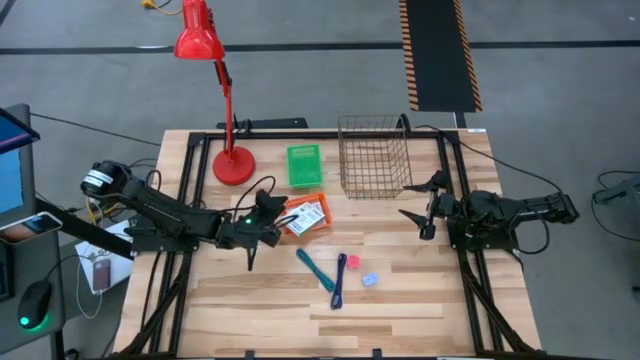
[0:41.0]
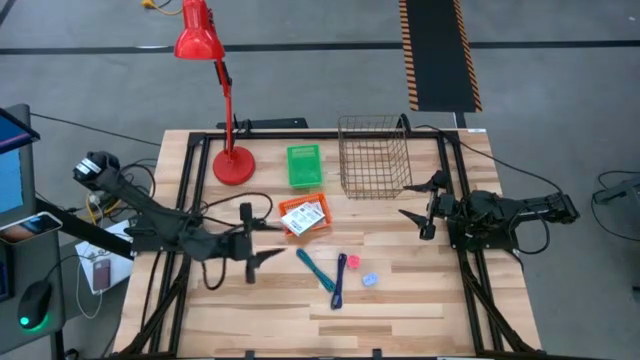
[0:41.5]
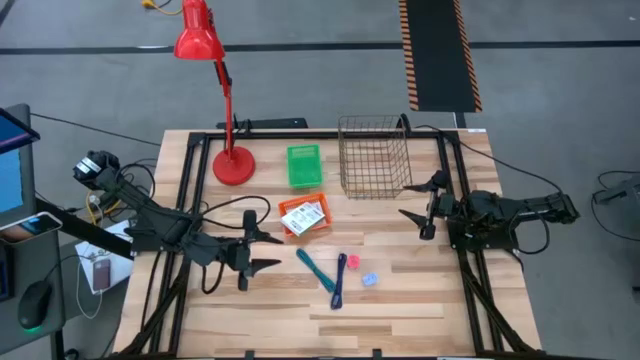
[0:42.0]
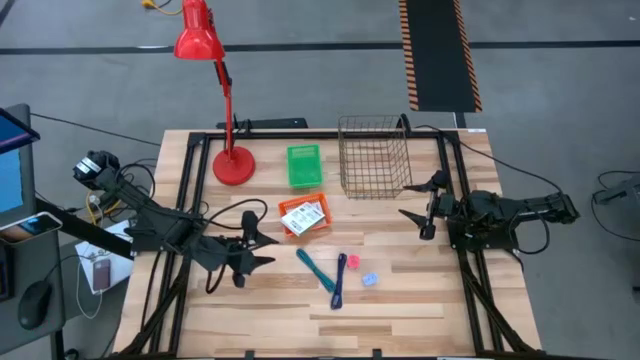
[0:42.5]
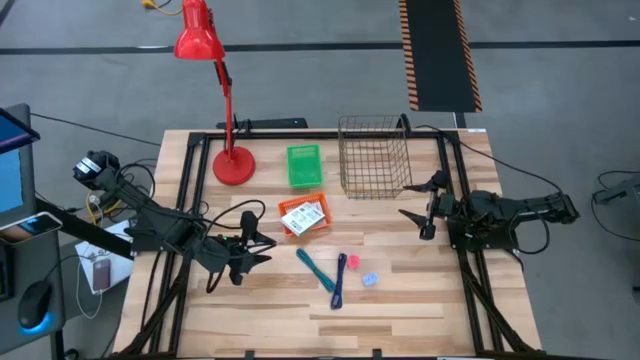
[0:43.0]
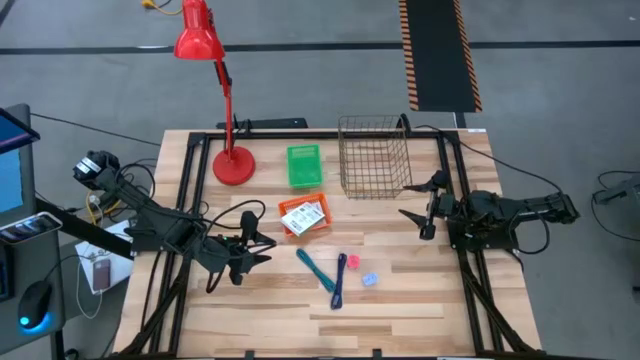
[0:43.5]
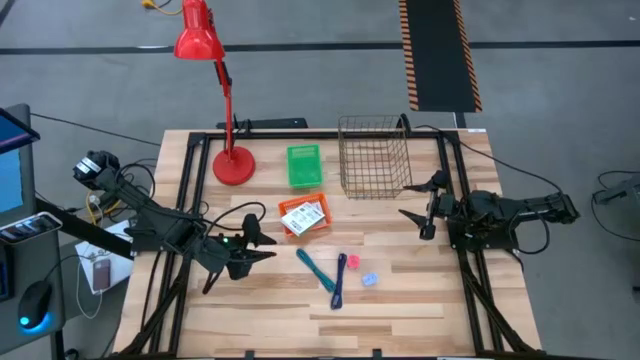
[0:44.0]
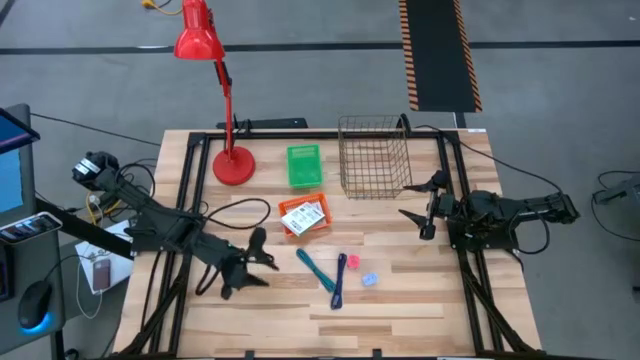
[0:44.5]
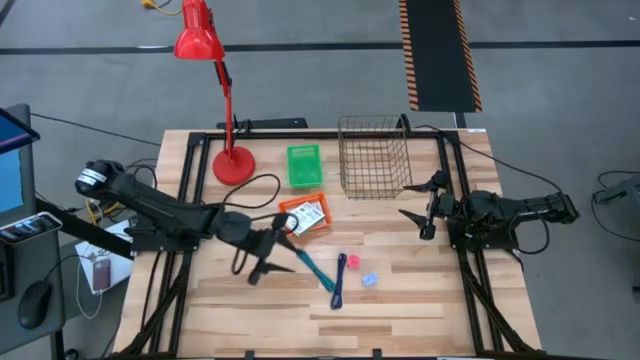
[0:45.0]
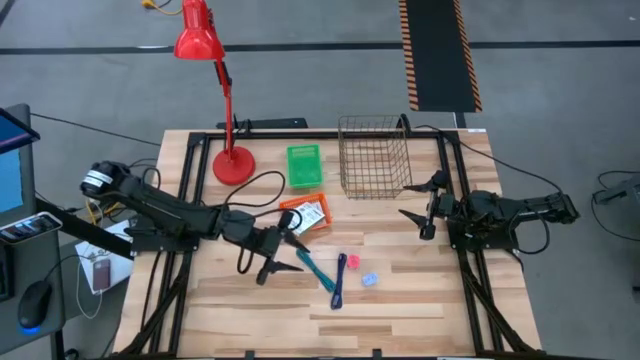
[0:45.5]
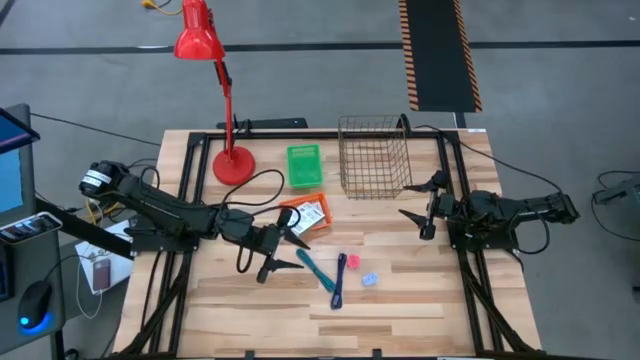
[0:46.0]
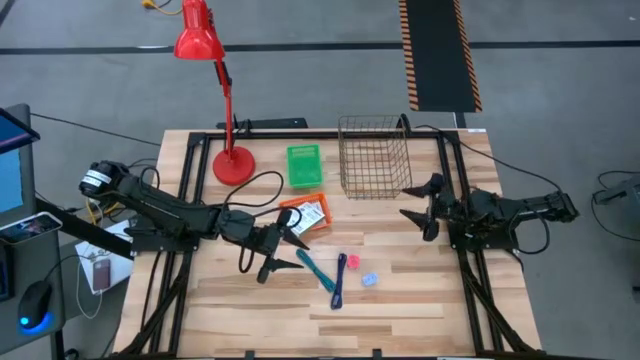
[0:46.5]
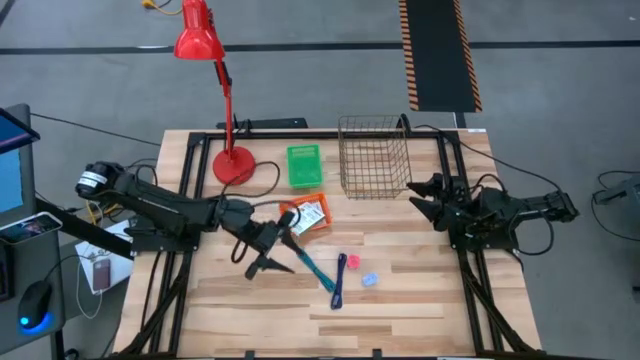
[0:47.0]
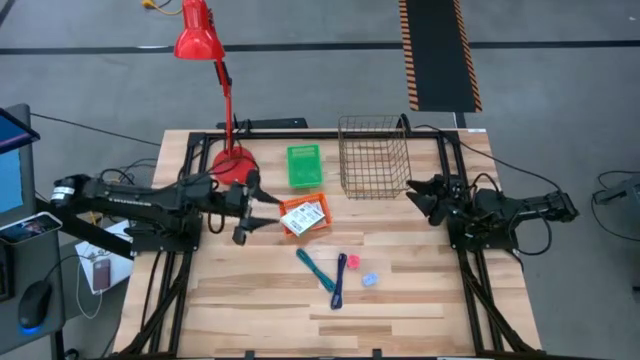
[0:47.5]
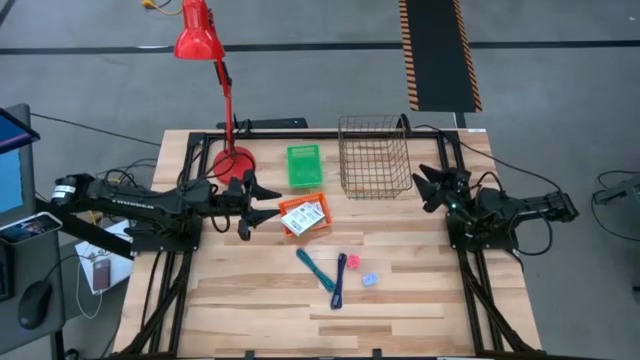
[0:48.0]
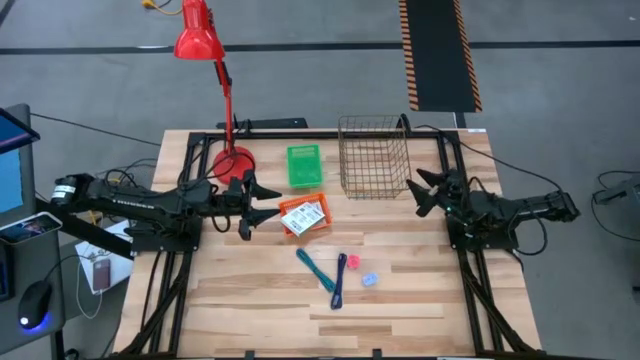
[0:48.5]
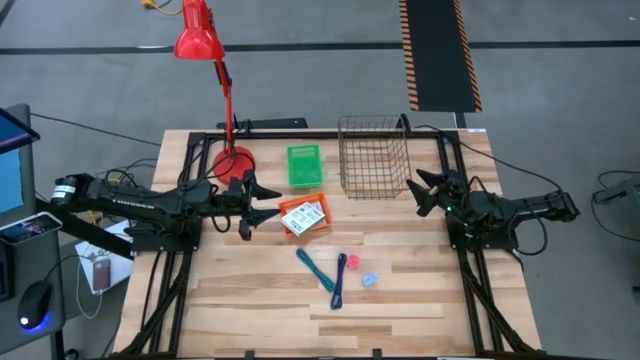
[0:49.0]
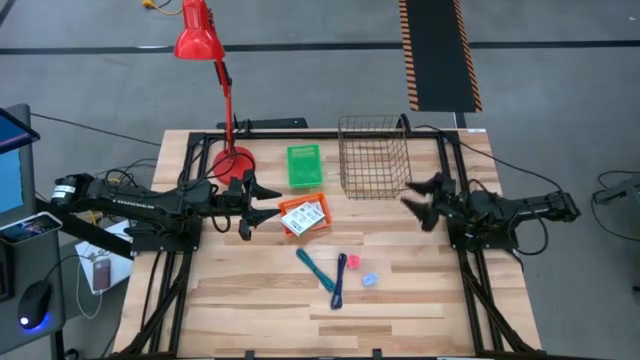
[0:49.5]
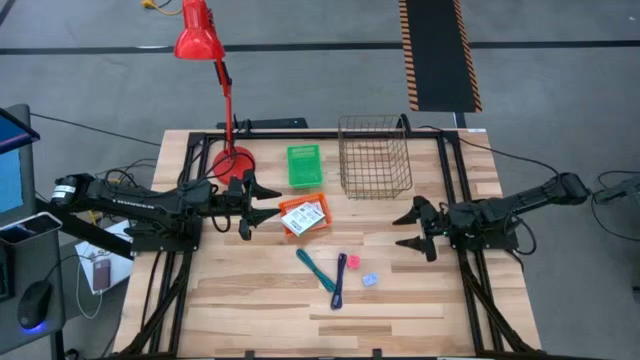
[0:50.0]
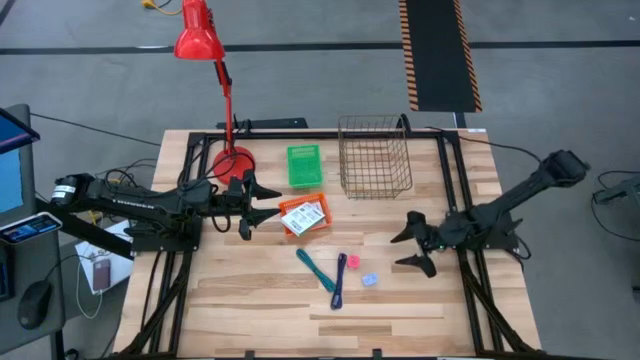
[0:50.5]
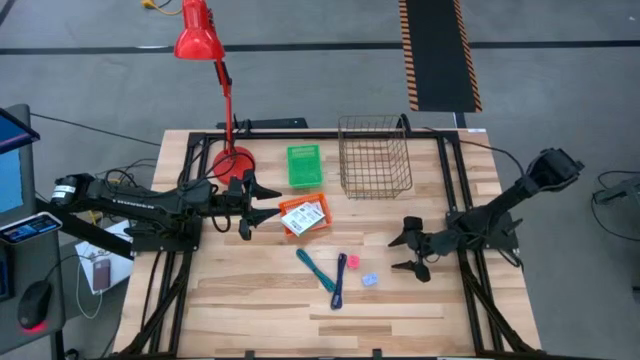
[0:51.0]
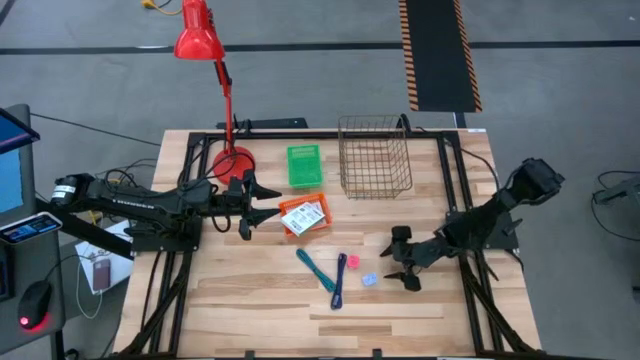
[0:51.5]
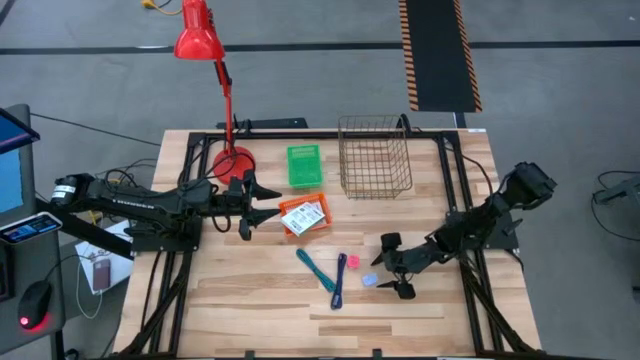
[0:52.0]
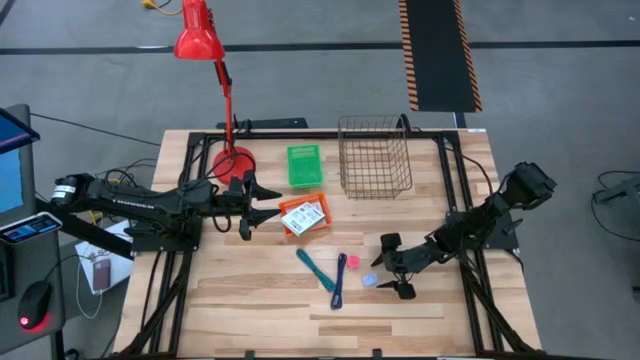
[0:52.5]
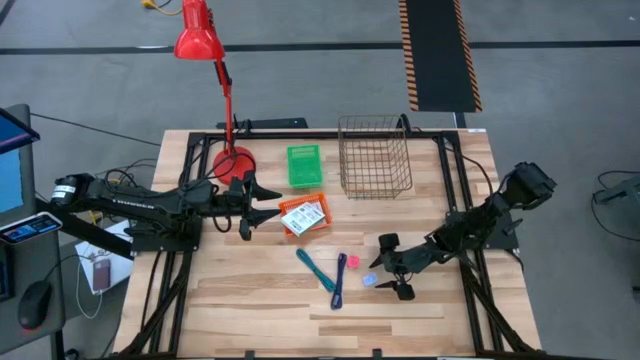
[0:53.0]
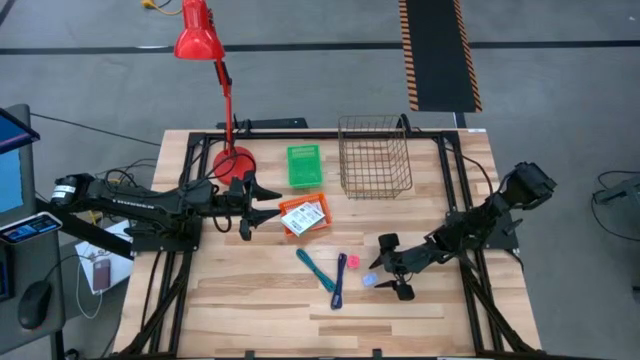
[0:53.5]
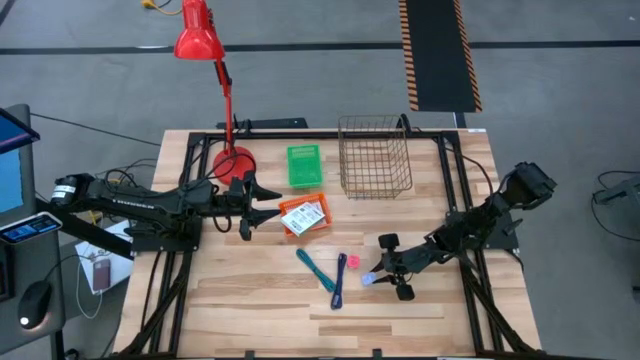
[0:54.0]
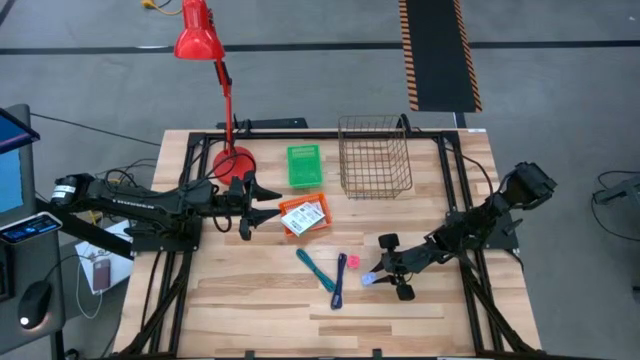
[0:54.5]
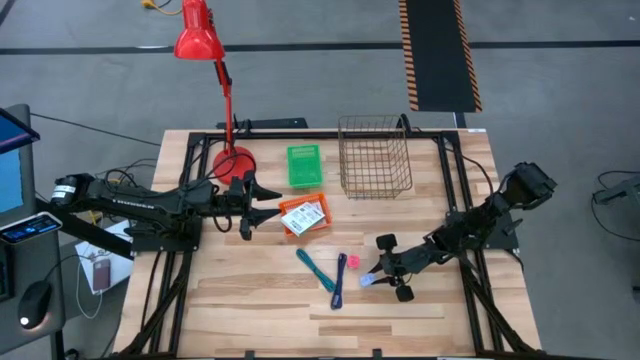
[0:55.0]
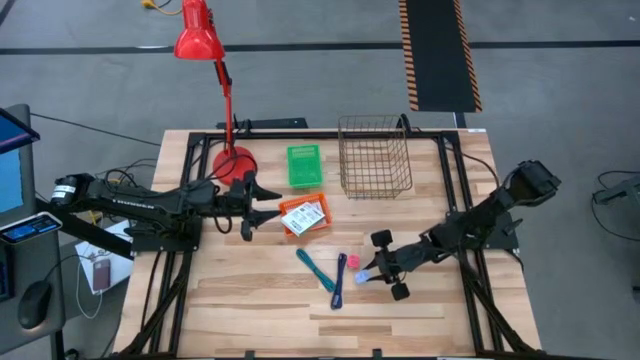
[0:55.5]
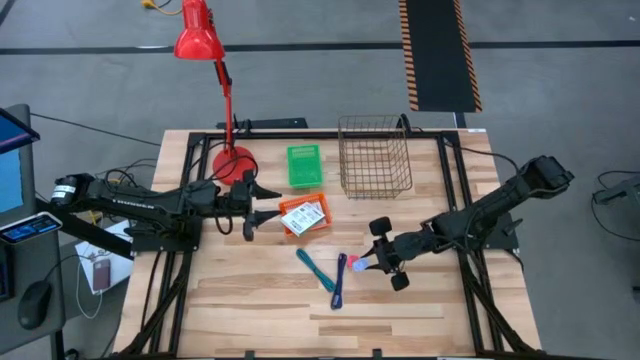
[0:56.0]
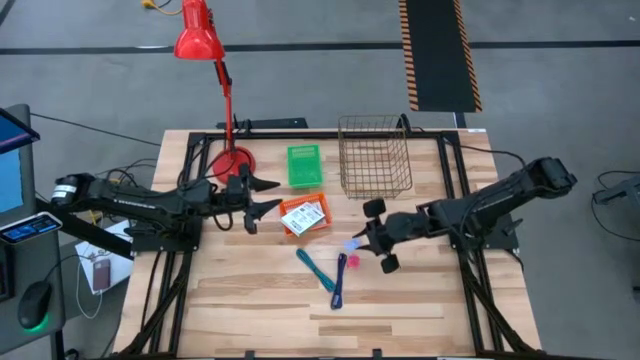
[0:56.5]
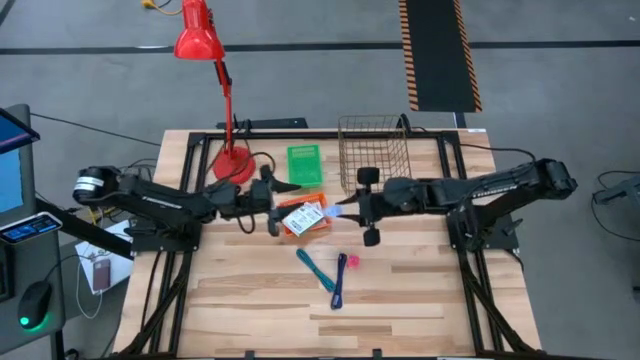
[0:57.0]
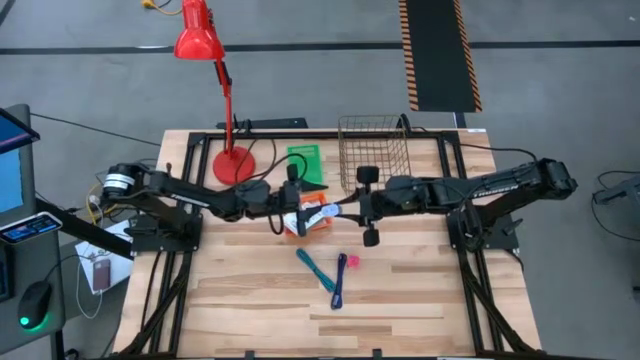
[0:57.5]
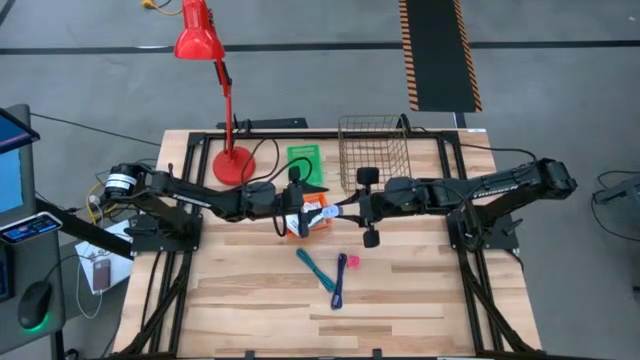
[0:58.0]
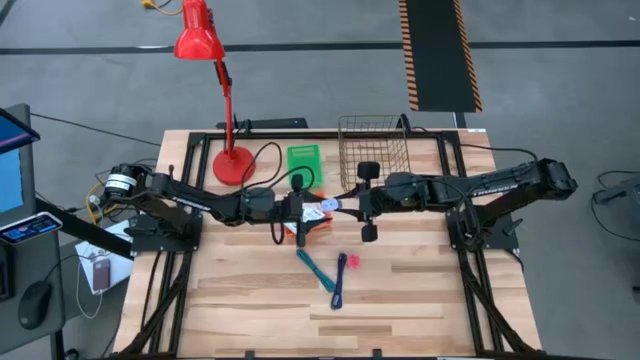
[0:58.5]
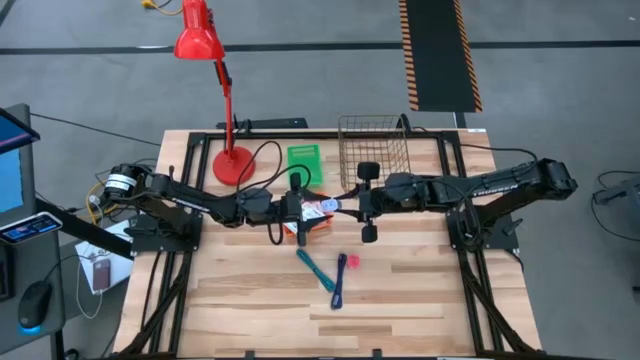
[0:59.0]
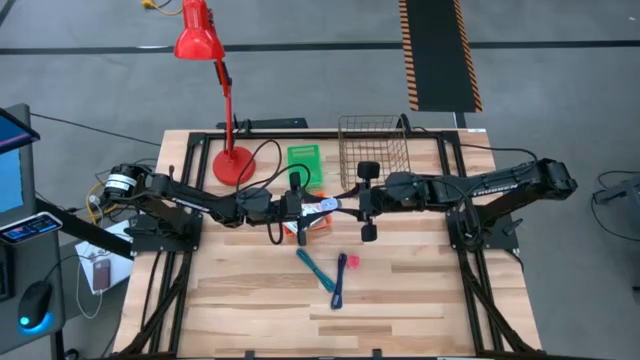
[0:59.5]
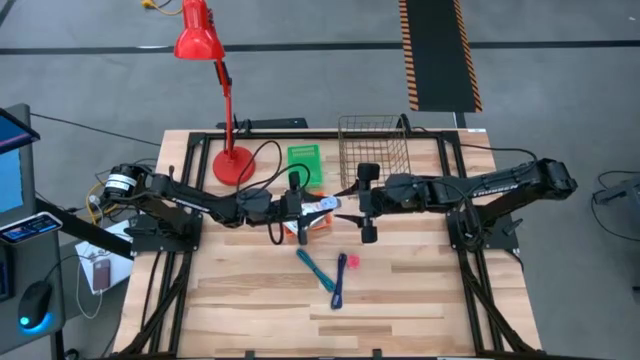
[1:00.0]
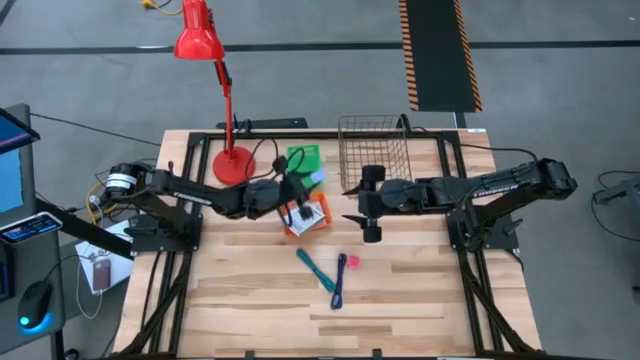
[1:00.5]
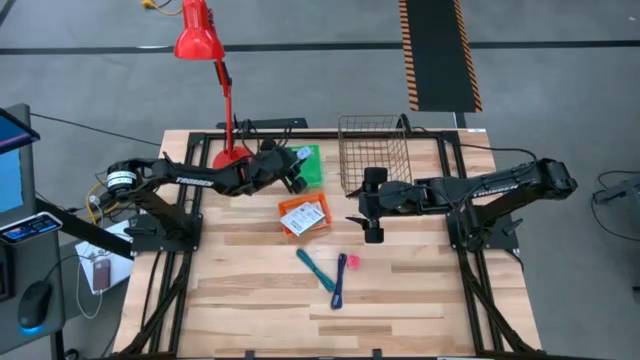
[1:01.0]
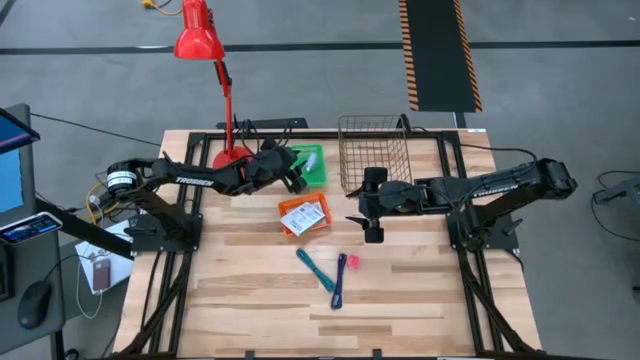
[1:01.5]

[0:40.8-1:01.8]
Task: Pick and place items into bin
Put the white adapter into the green bin

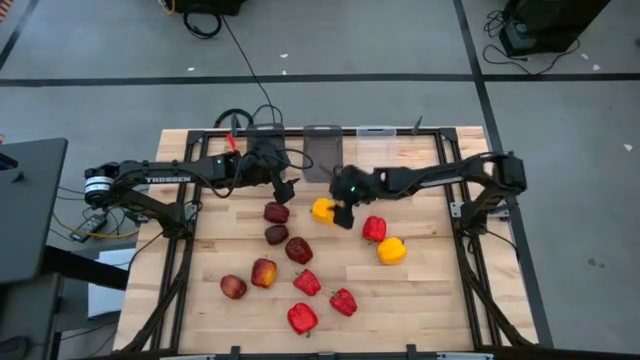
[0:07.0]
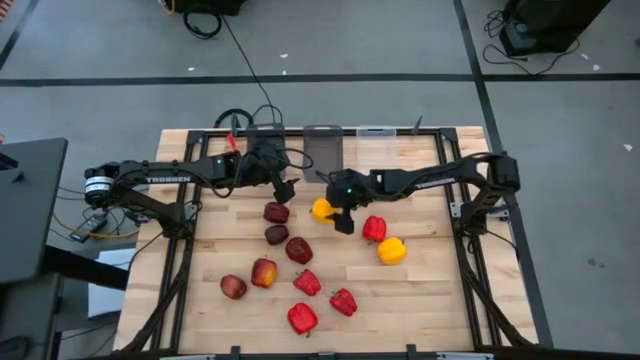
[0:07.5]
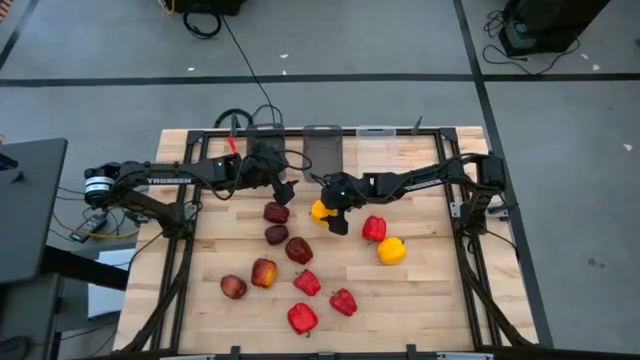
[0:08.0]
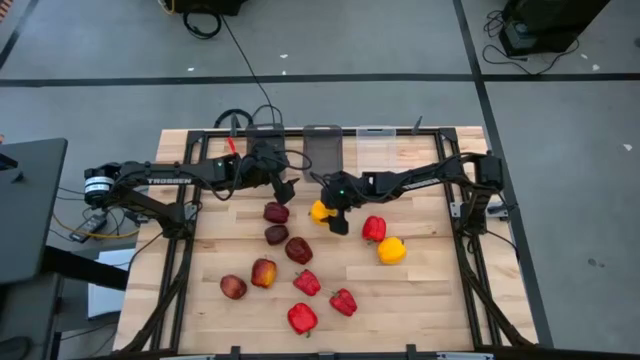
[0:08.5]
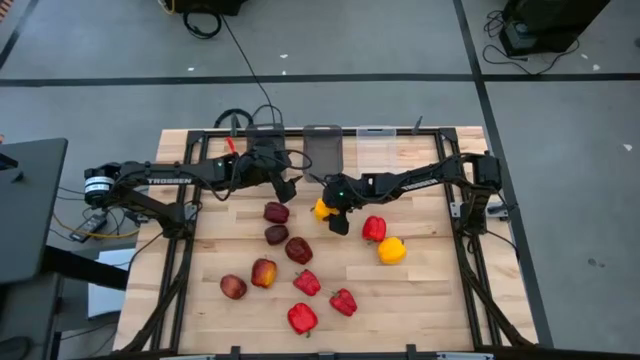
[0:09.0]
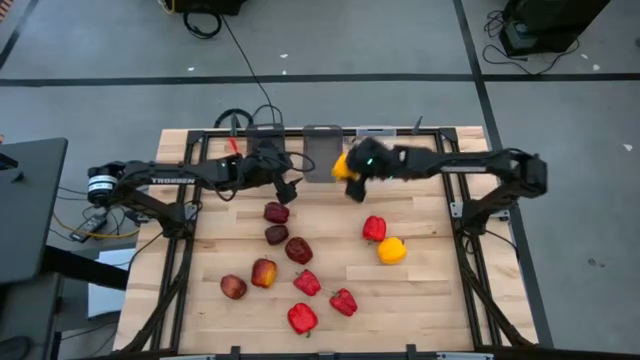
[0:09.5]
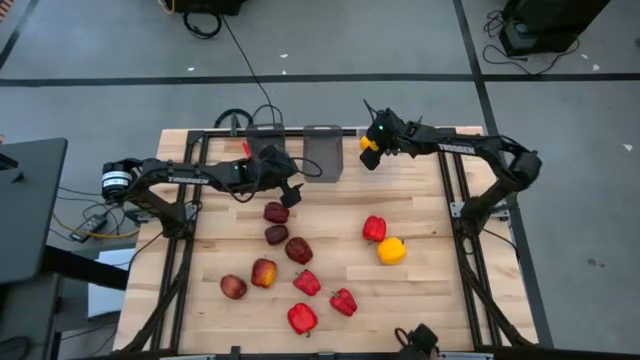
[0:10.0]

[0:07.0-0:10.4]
Task: Sort produce into baskets
Put the yellow bell pepper into the transparent bin
